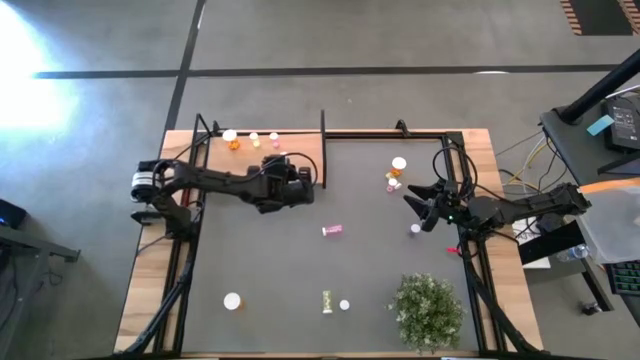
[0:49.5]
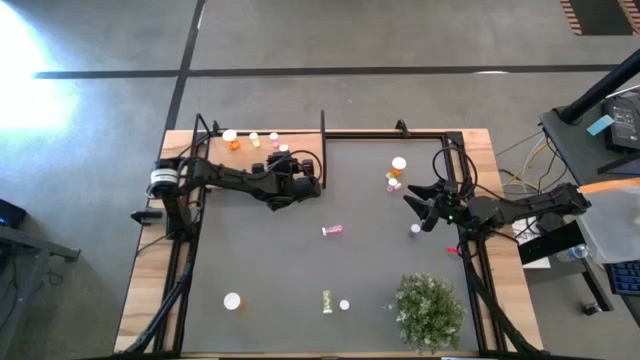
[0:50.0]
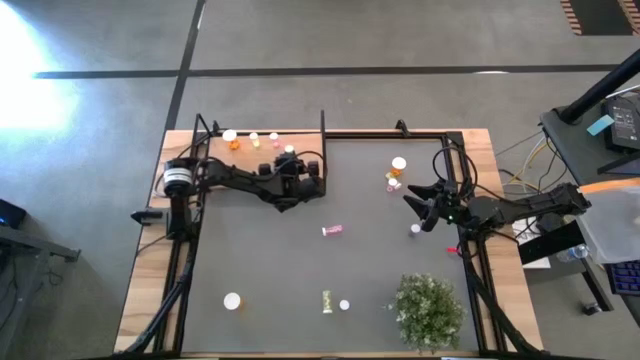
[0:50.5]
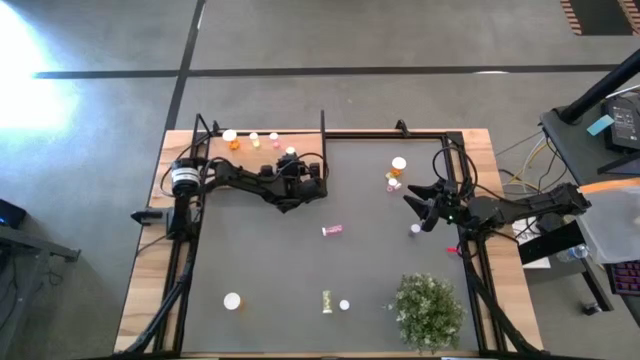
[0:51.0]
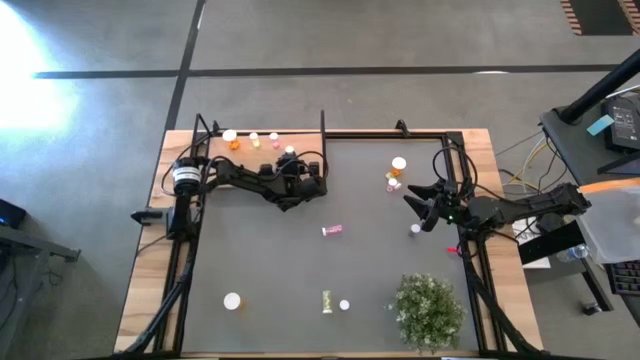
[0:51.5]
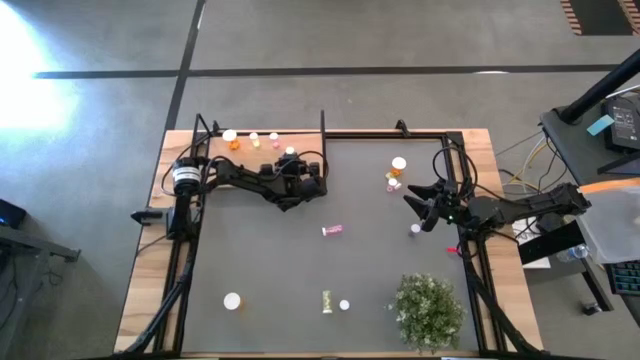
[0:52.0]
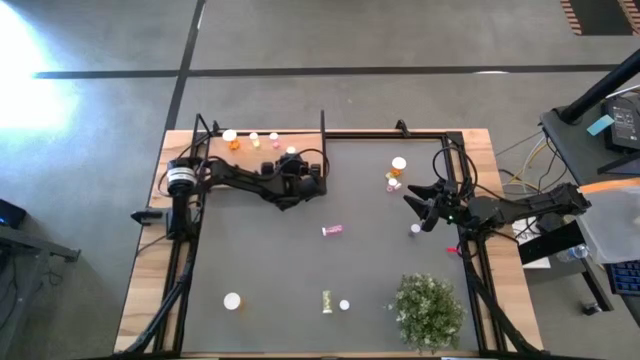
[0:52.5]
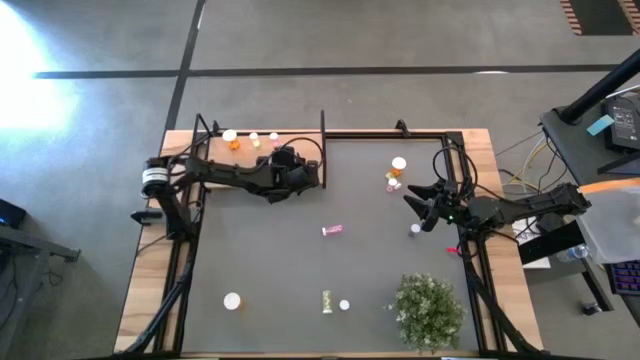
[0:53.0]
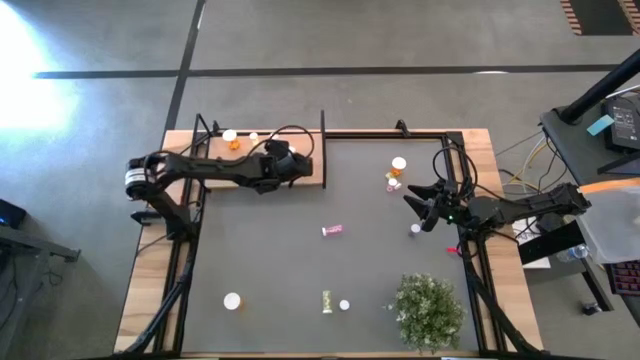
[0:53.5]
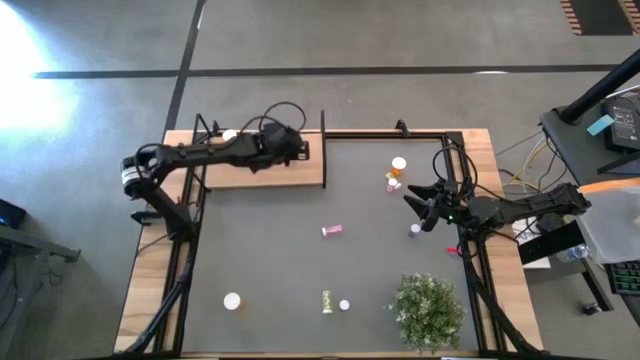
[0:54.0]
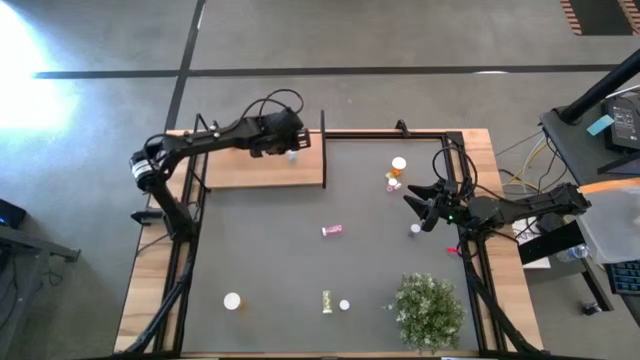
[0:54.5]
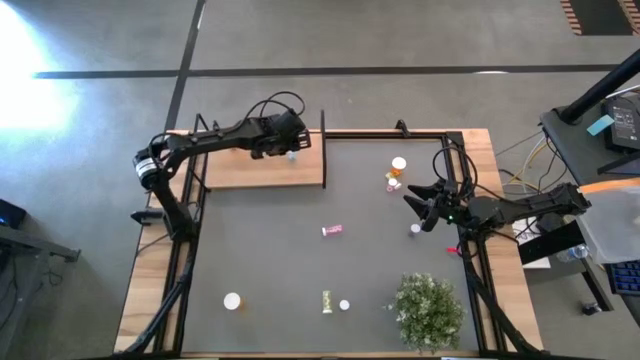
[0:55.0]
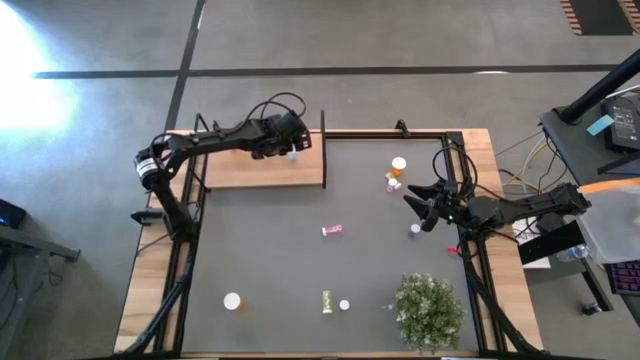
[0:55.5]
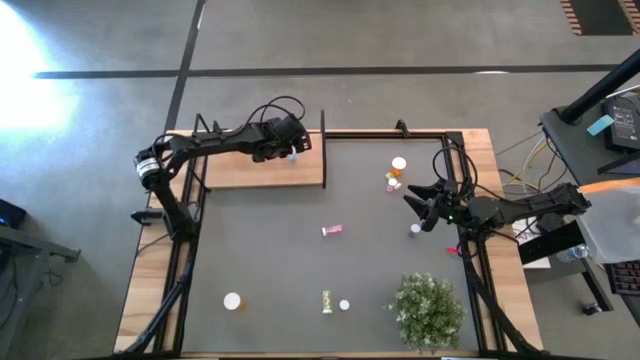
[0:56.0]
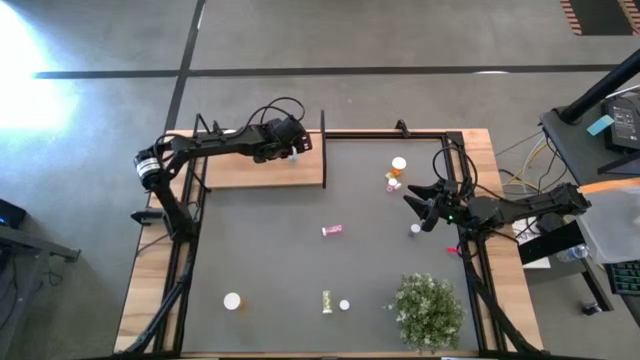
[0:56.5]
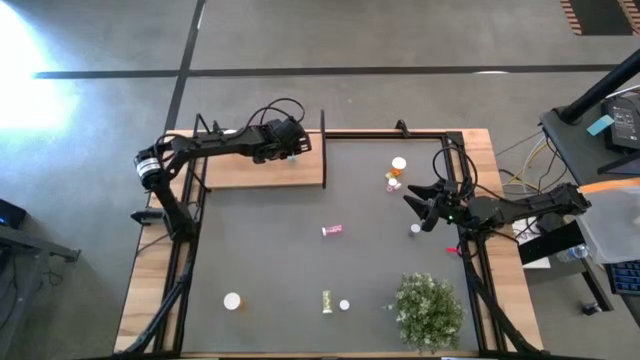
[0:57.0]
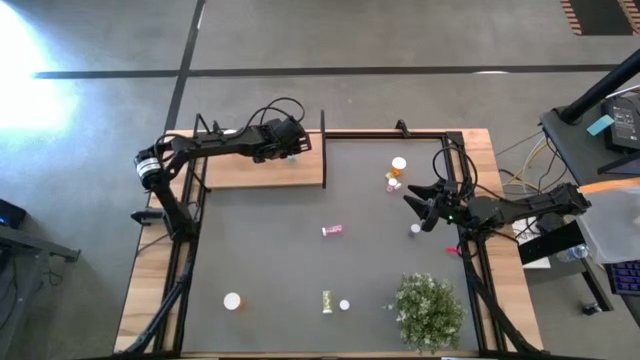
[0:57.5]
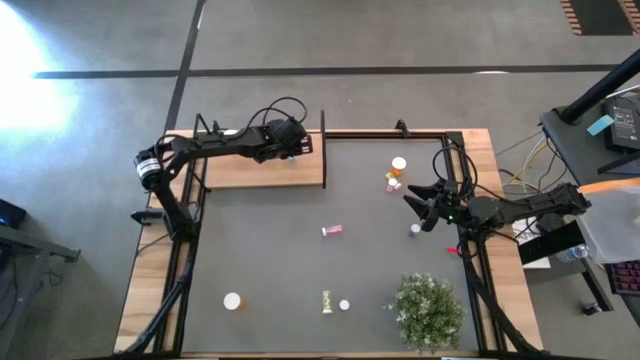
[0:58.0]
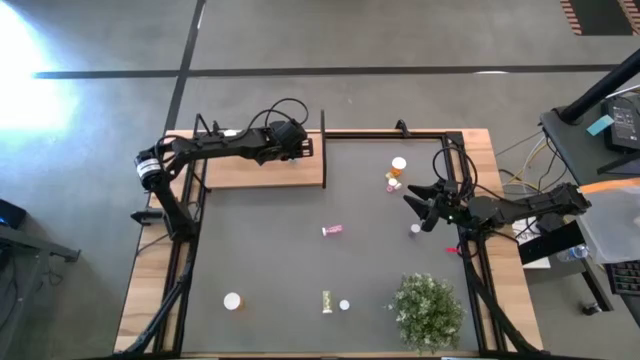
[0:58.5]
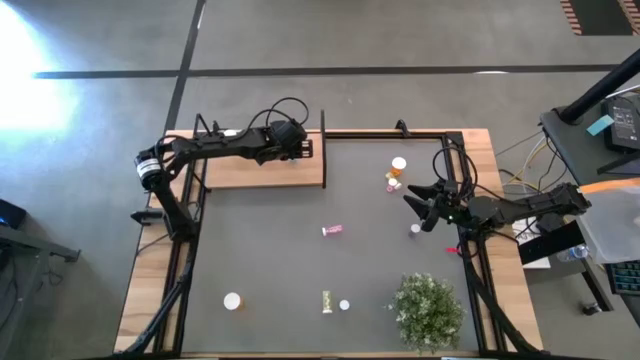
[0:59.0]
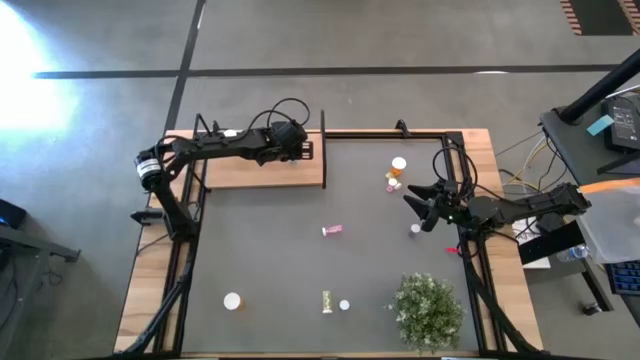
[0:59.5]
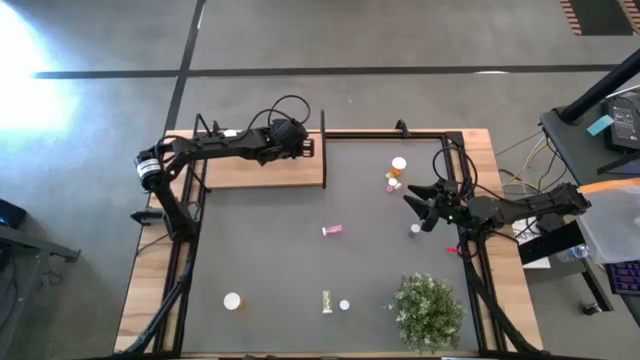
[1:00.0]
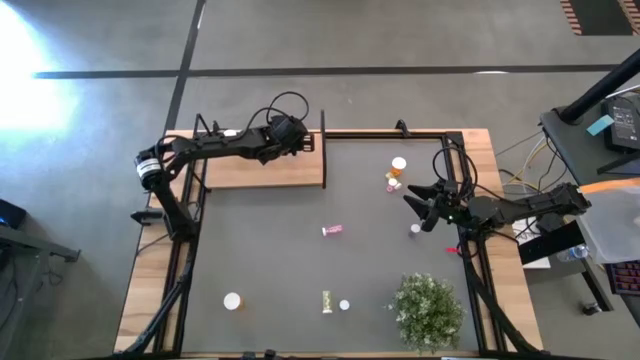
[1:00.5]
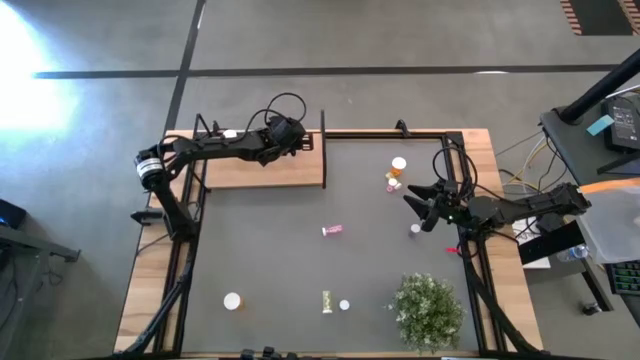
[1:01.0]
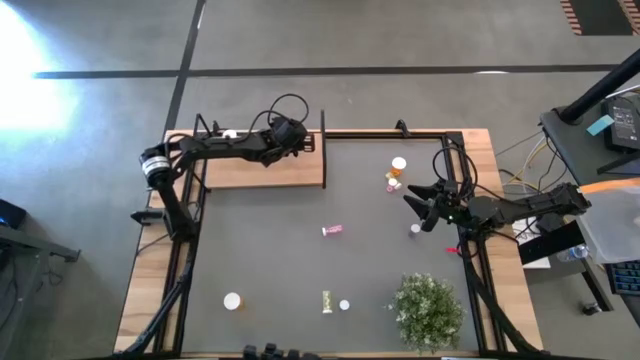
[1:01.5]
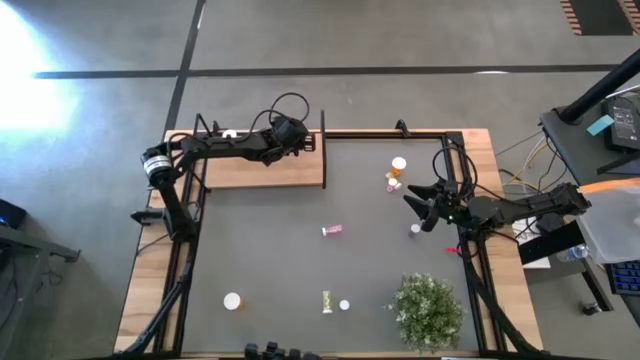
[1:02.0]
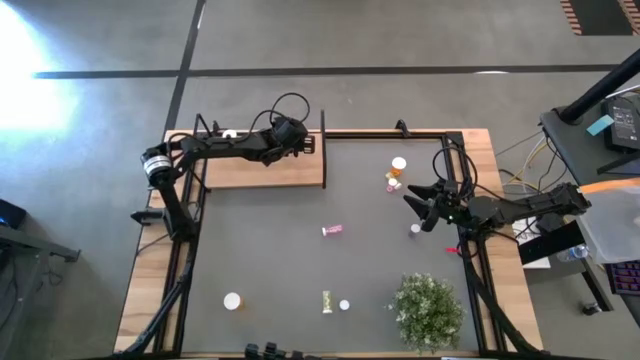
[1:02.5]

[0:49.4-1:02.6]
Task: Pick and place medicine bottles onto shelf by color
Put the top left blue pill bottle on the shelf

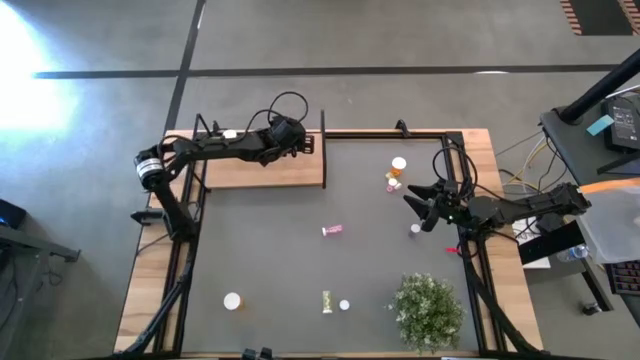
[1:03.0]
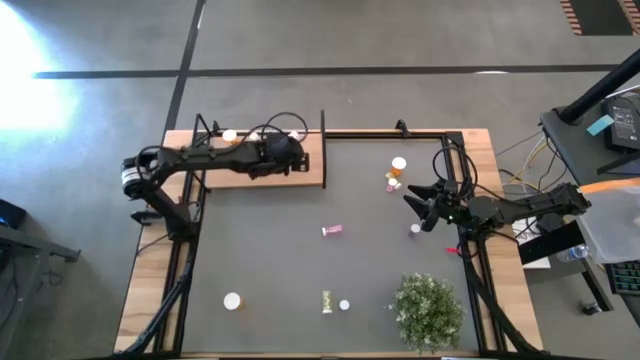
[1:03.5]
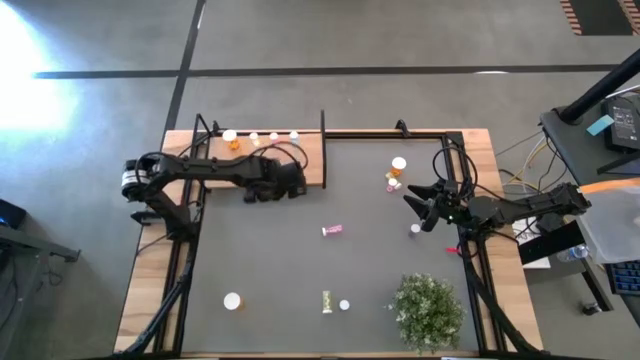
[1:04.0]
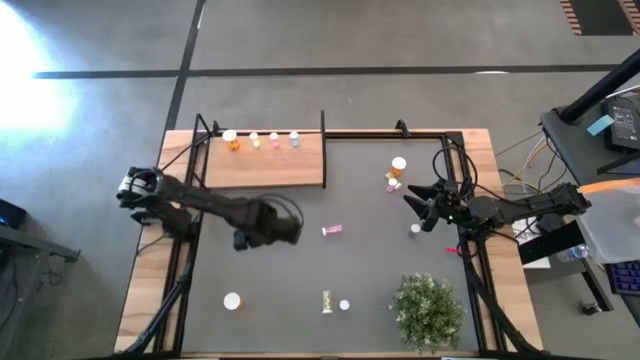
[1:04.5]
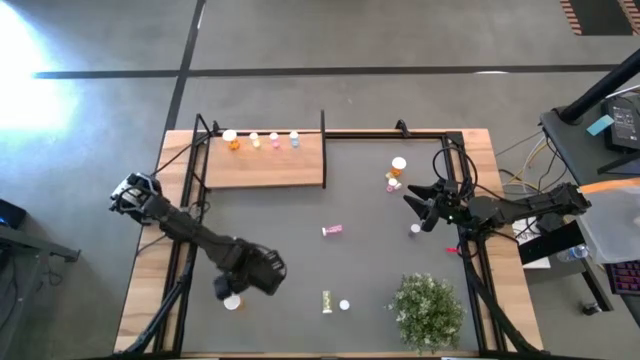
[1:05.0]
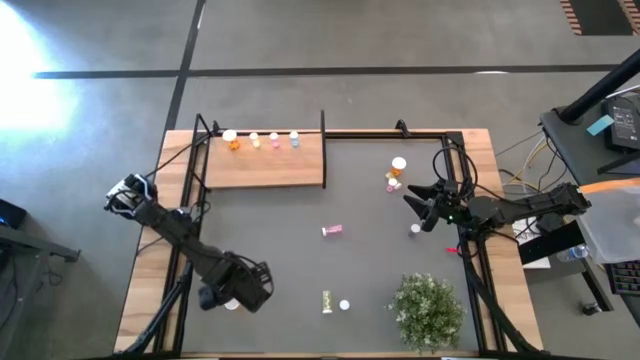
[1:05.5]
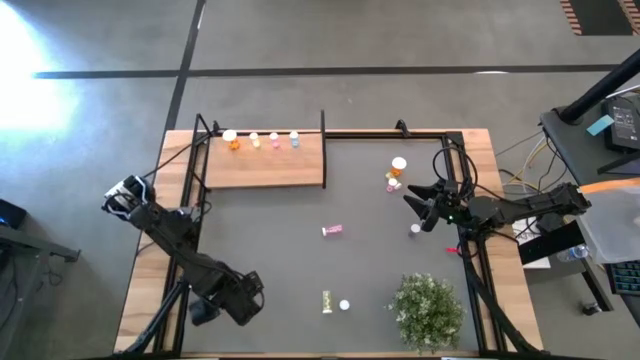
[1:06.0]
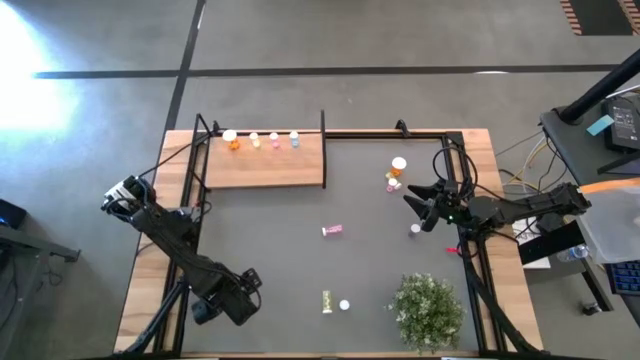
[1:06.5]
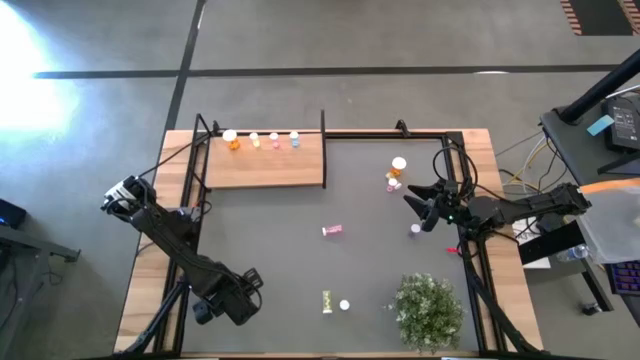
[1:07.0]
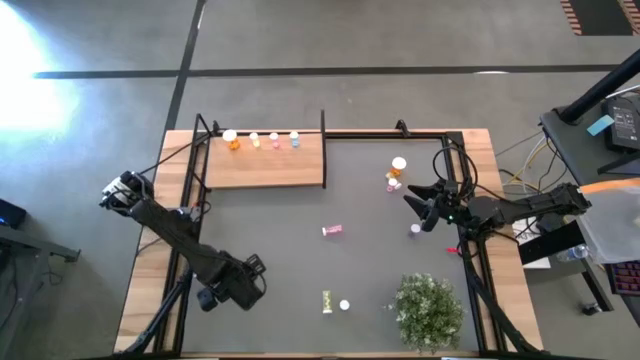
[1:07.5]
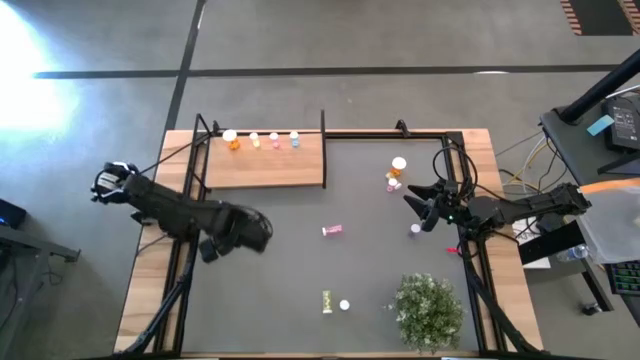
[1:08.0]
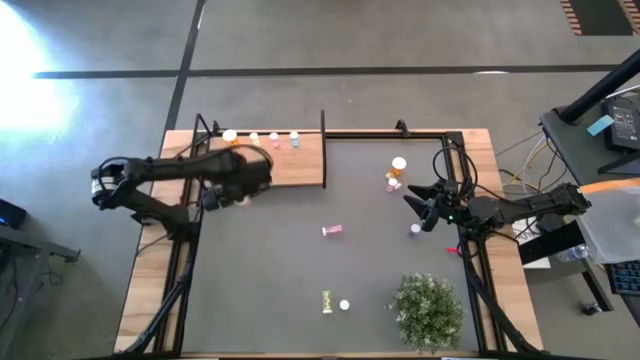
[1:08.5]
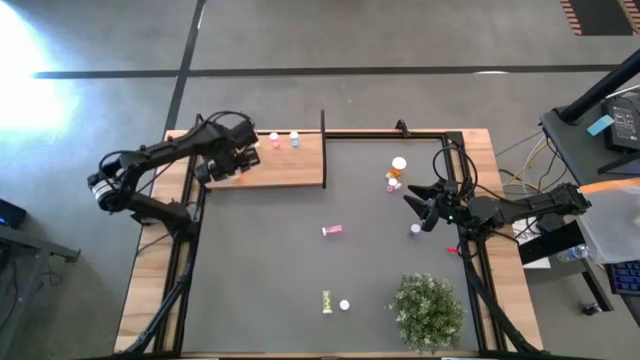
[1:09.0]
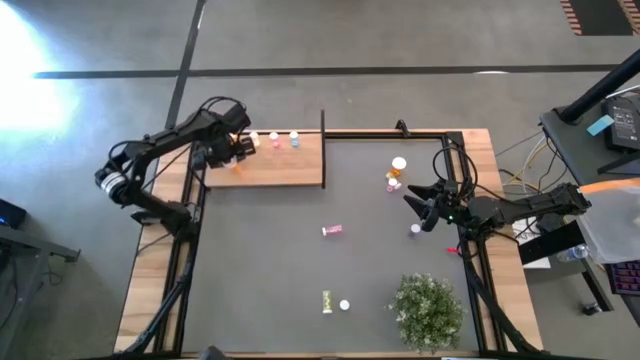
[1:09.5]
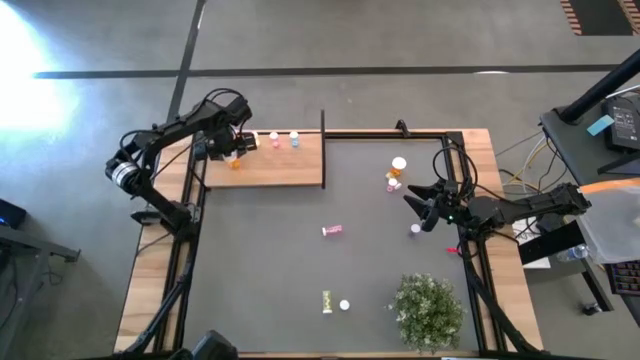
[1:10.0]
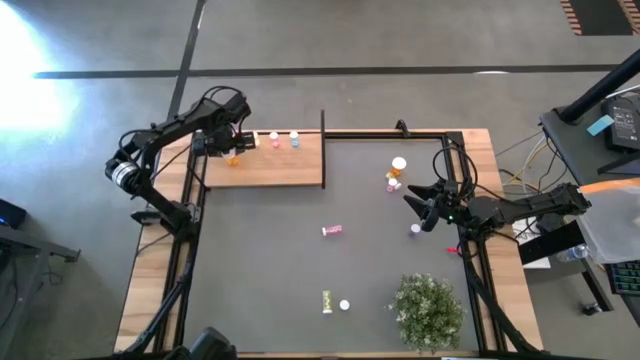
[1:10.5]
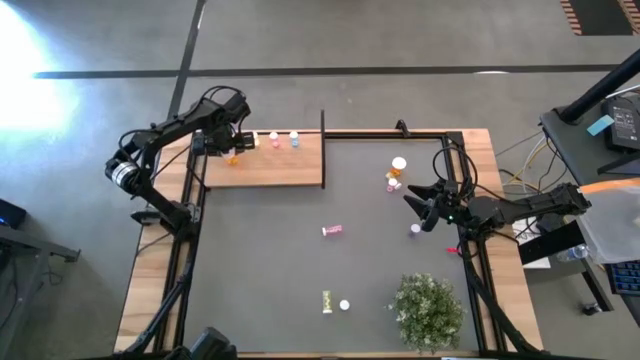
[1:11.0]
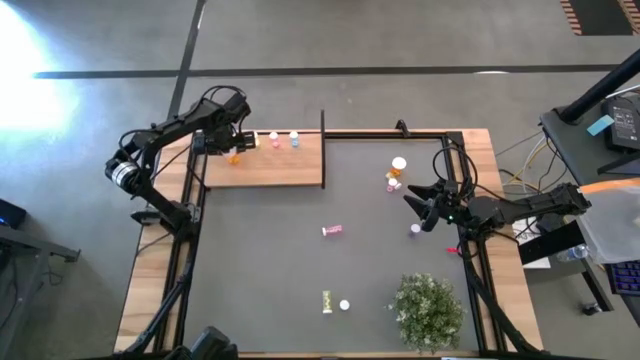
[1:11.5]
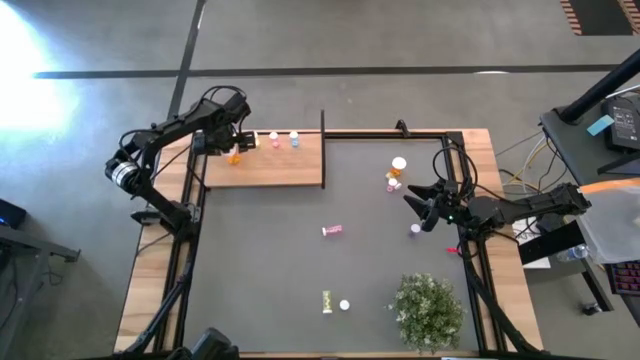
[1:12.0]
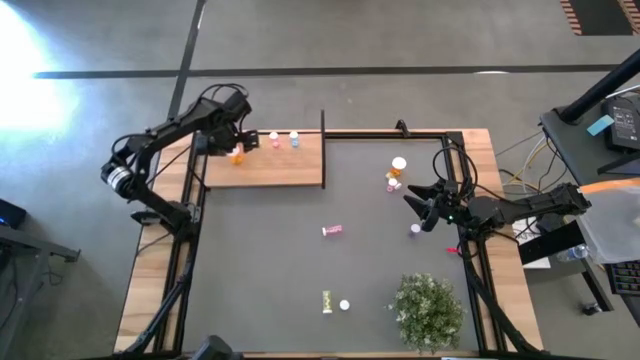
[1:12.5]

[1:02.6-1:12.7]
Put the bottom orange pill bottle on the shelf aligned with the other orange pill bottle
